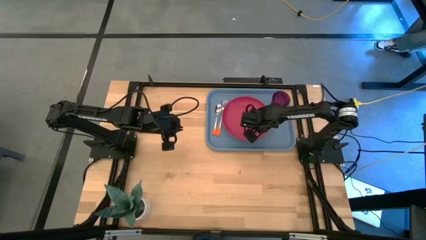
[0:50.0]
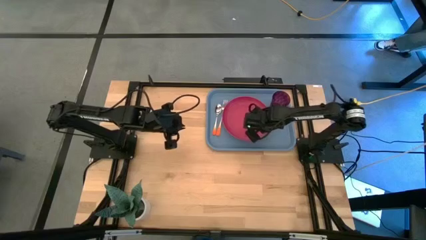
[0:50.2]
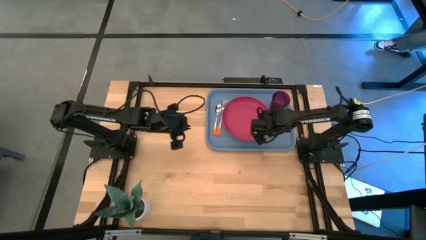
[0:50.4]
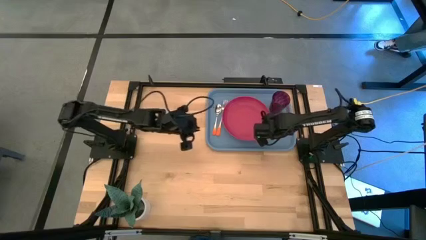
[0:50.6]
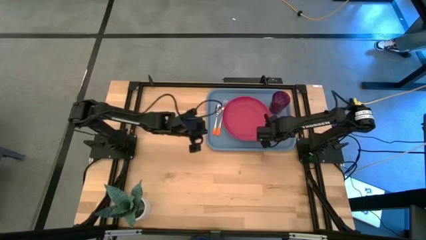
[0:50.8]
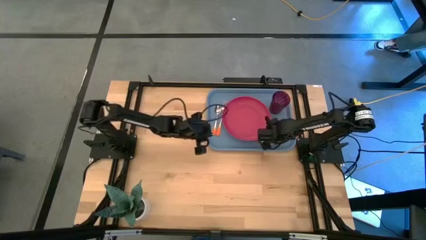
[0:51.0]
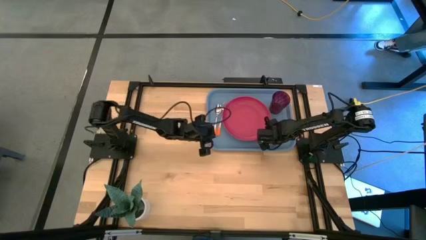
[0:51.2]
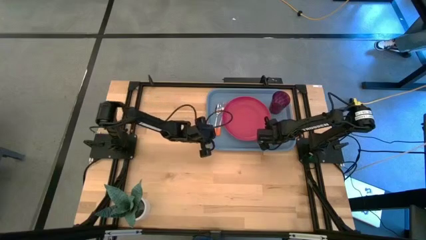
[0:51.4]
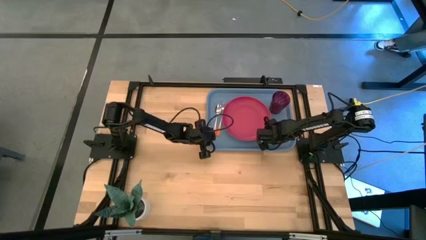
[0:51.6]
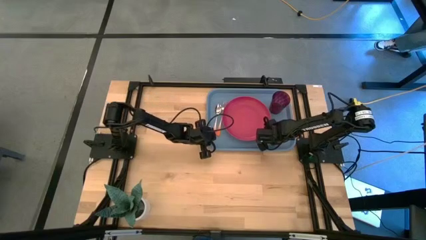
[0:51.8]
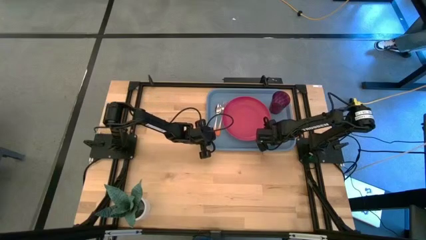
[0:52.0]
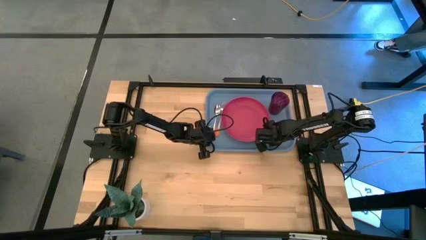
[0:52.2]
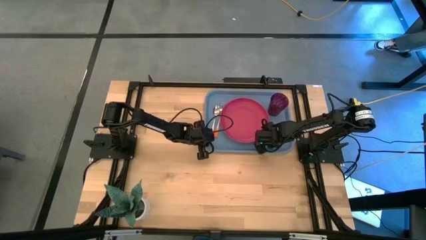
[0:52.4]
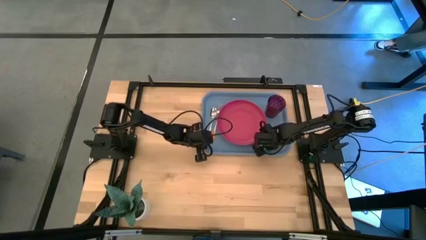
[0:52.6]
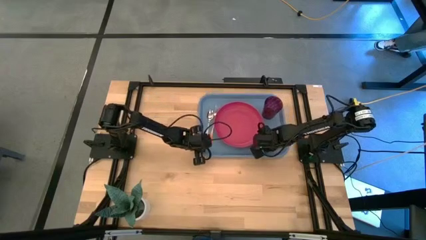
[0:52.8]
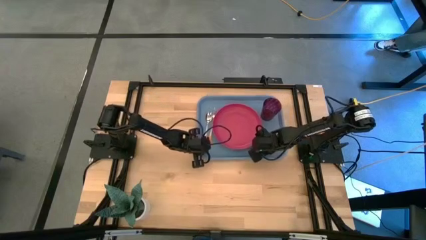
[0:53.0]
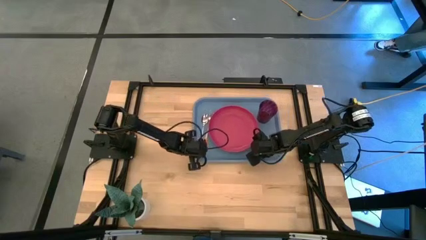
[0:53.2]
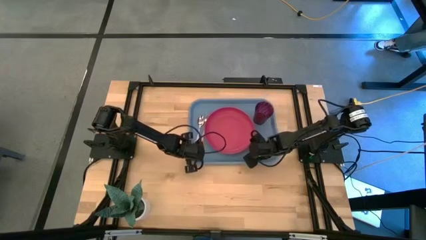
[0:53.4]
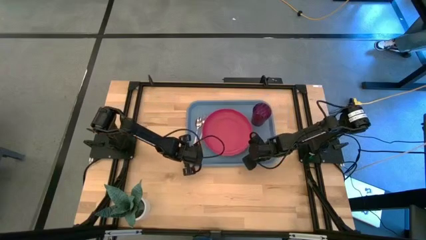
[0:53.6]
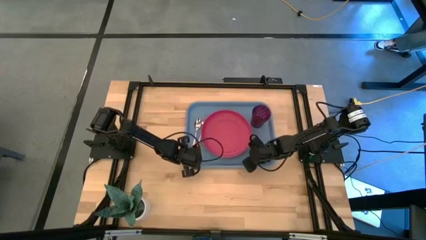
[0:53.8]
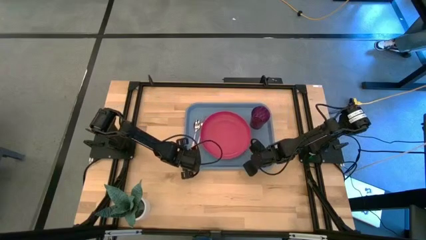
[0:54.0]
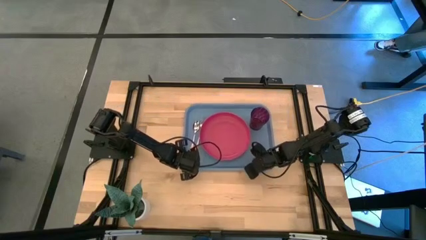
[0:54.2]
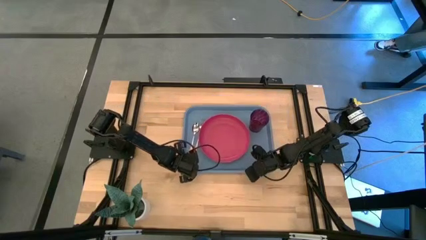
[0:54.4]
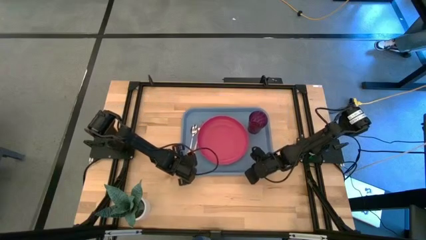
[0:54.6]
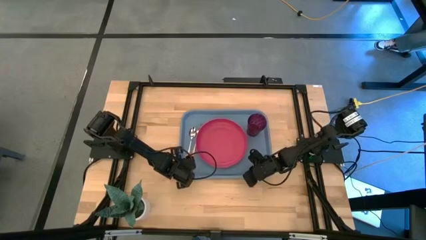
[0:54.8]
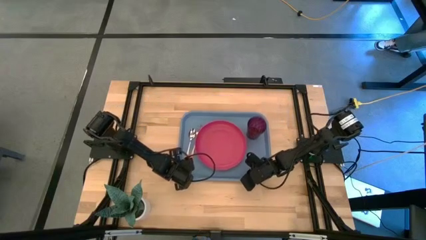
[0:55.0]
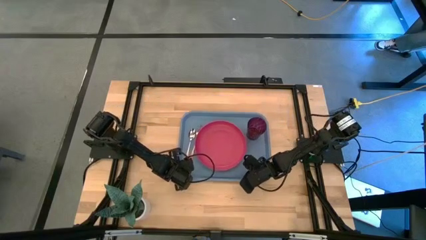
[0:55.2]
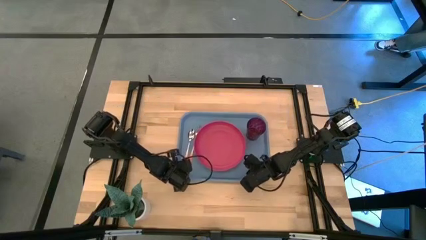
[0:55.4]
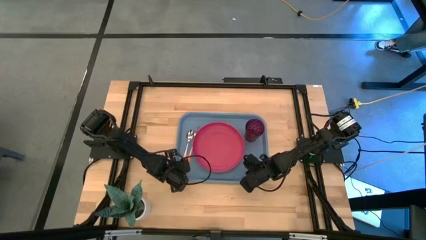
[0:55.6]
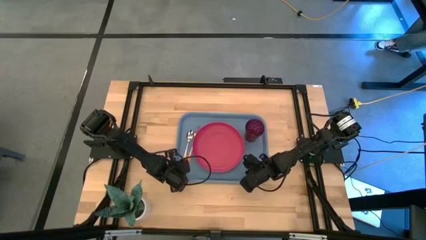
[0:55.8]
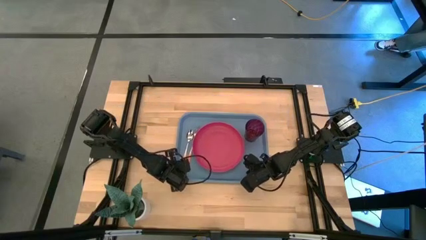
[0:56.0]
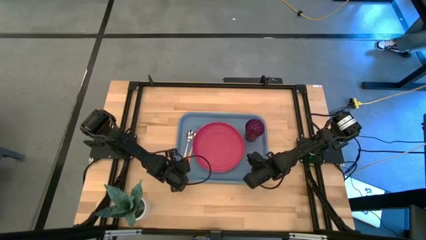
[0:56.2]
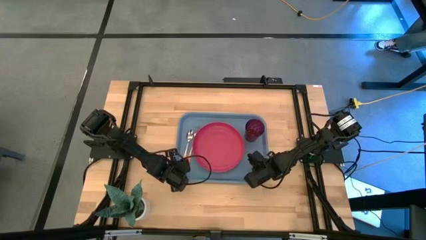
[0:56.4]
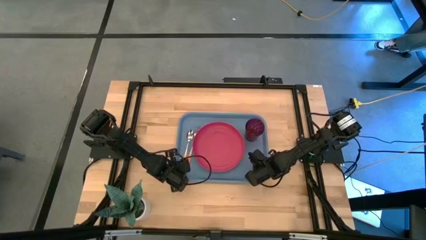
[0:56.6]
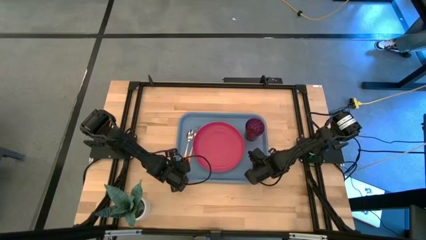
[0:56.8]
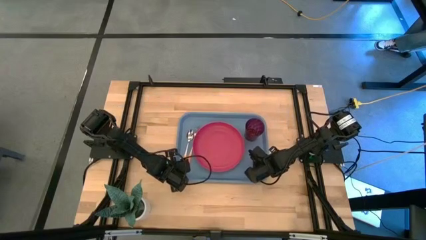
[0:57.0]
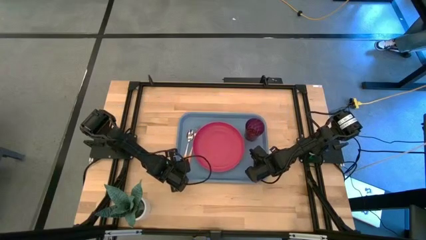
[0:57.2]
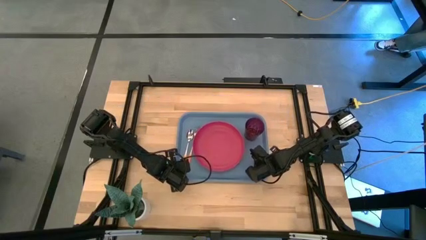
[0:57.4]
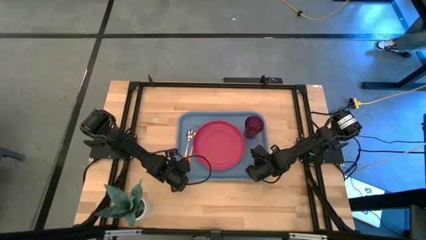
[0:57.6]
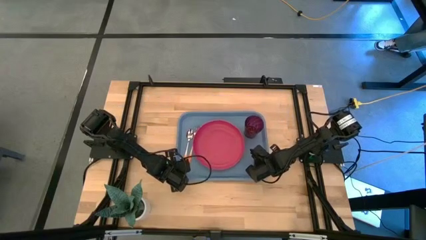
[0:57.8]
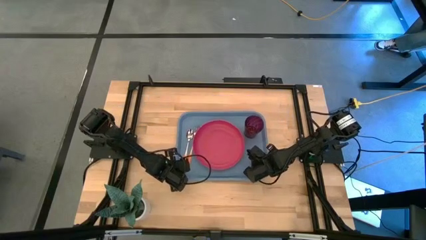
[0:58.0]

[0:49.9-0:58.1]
Task: Pick and place plate/cup/fork/spoon on tray
Move the blue tray from the top right to the center of the table

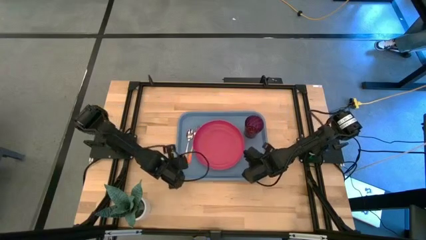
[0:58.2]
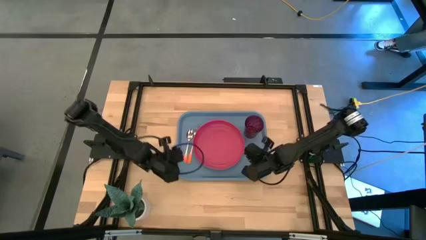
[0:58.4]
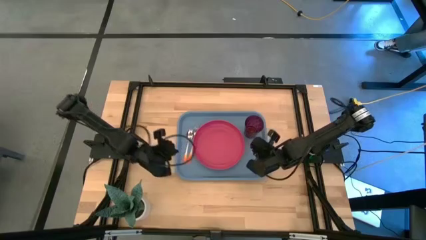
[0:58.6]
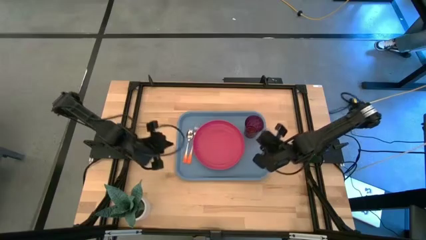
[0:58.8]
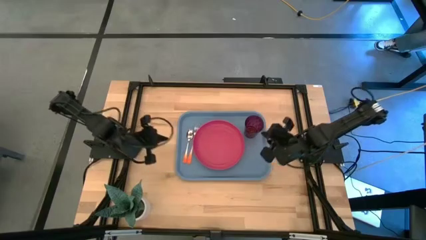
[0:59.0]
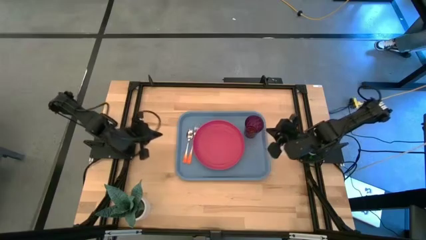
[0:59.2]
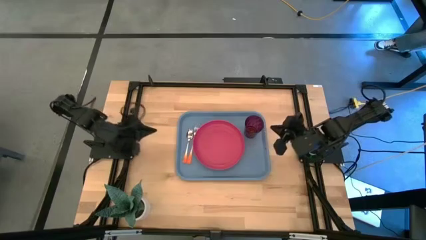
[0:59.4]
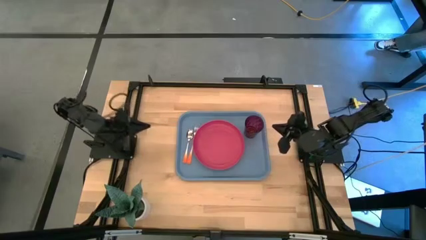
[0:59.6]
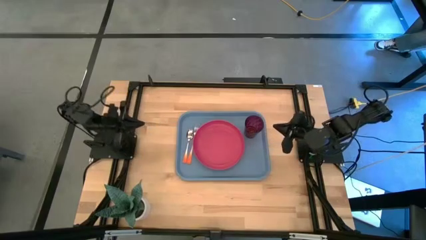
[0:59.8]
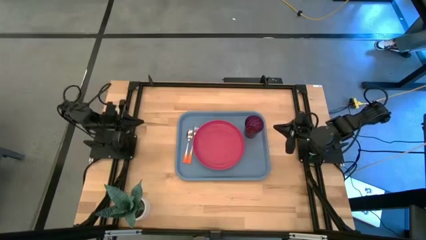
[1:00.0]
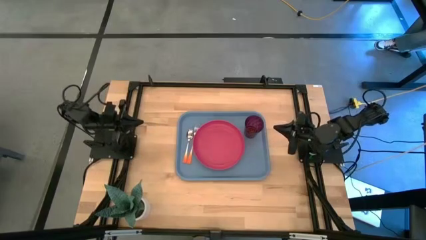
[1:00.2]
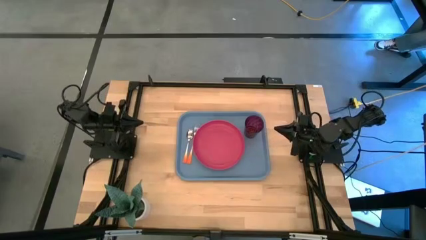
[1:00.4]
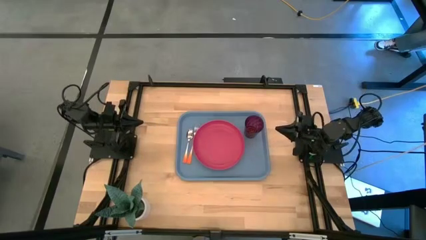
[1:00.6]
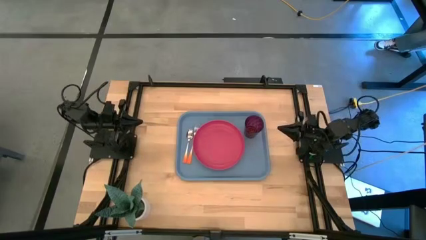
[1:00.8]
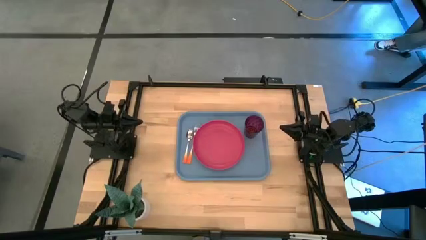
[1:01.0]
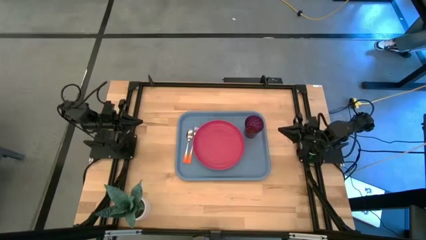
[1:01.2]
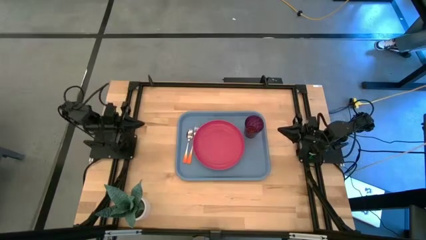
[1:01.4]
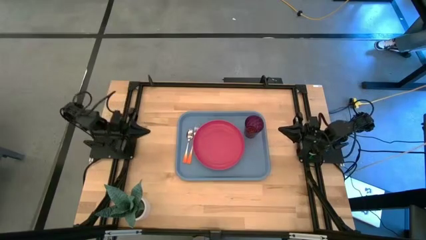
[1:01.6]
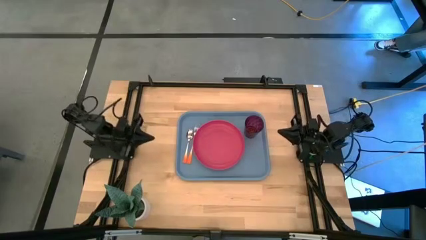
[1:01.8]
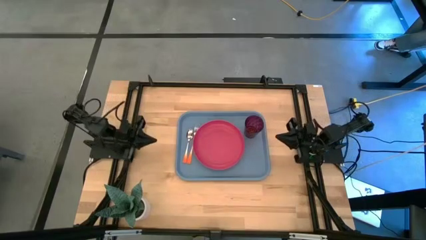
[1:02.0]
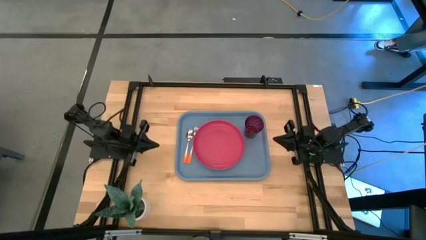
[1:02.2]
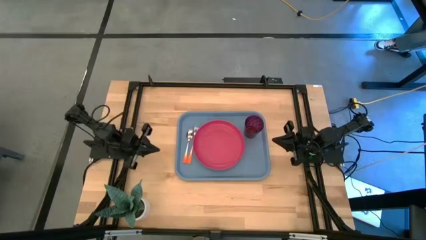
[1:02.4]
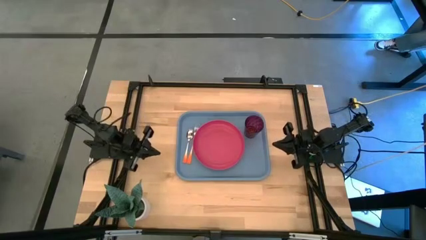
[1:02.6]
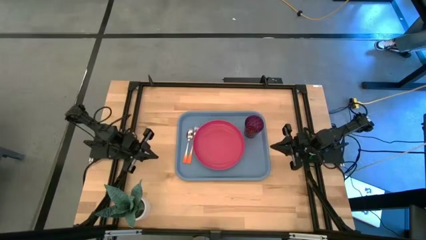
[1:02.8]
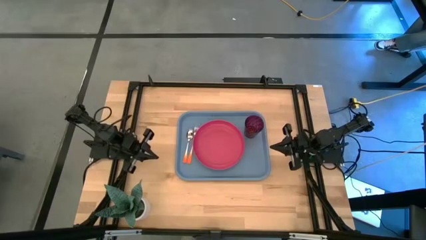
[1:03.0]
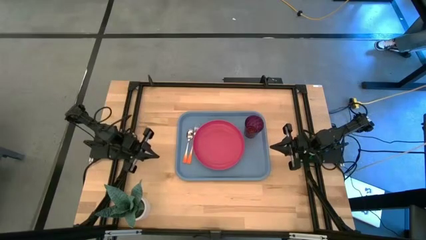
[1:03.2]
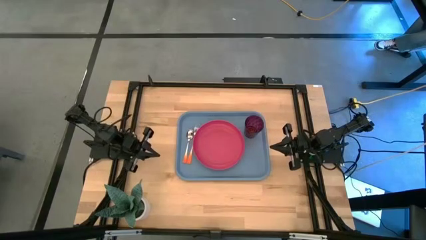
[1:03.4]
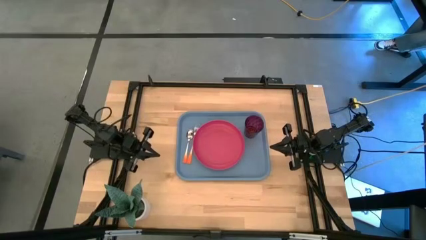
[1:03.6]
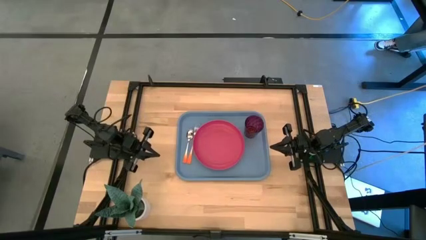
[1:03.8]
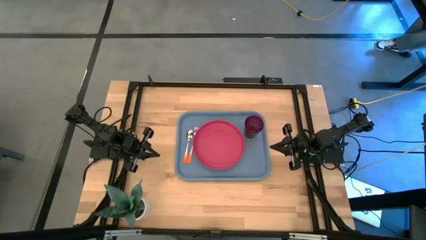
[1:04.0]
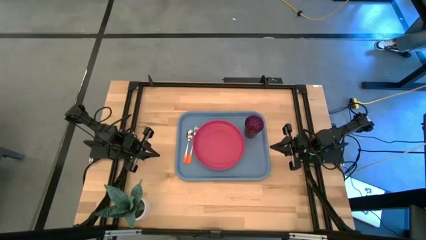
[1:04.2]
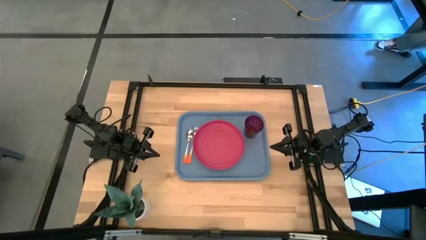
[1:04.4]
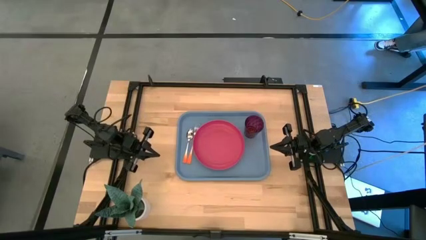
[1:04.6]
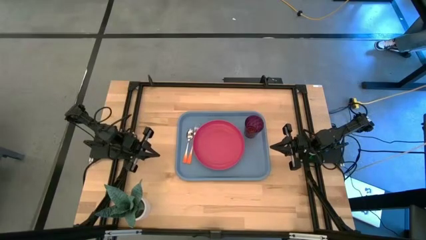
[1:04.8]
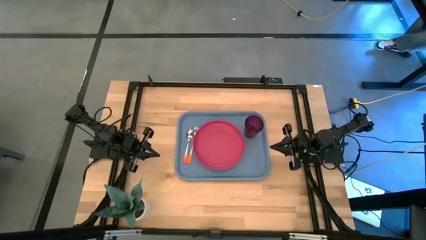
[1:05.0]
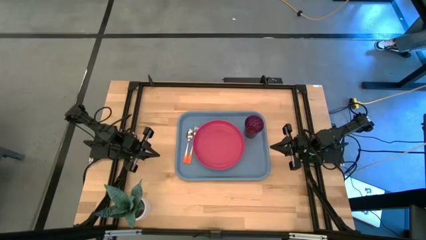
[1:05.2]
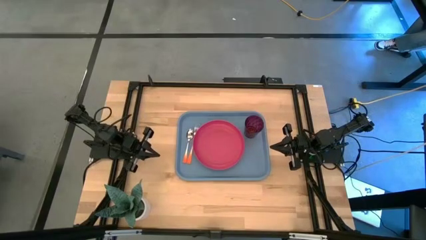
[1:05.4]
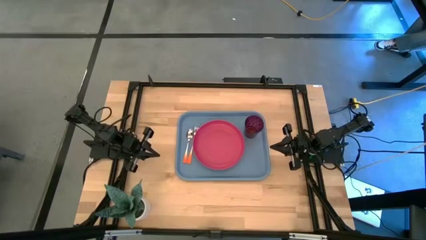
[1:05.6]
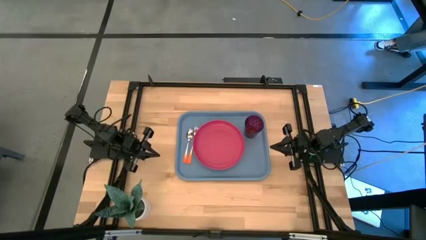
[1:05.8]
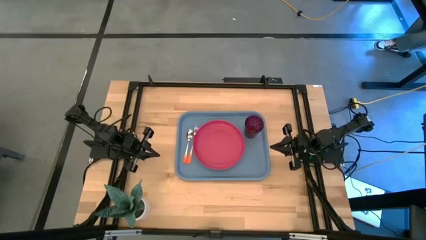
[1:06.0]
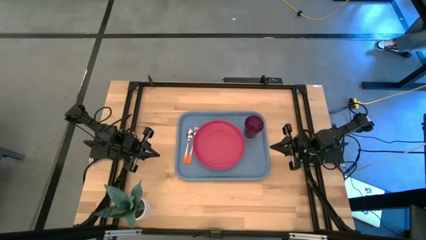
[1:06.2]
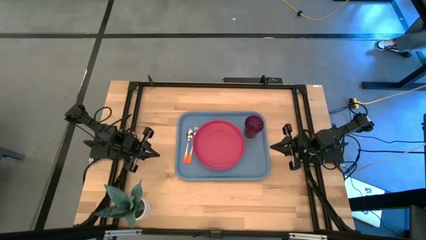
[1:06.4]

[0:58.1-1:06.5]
Return to Home Position

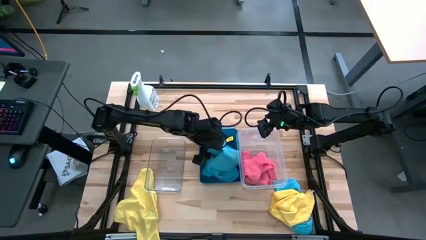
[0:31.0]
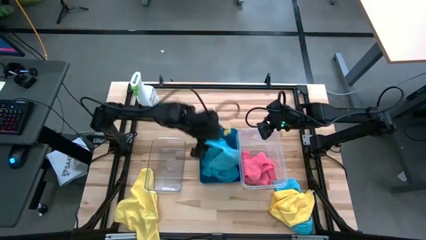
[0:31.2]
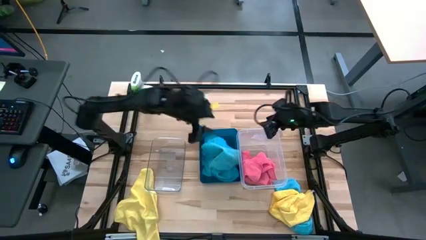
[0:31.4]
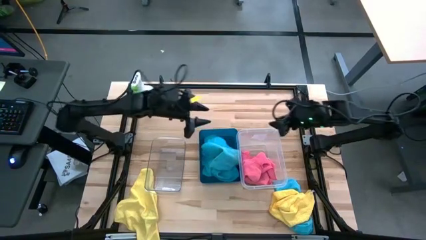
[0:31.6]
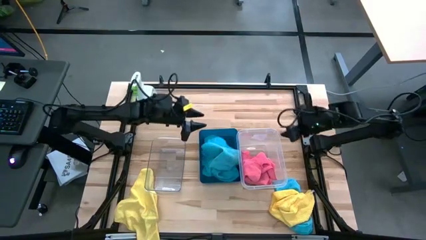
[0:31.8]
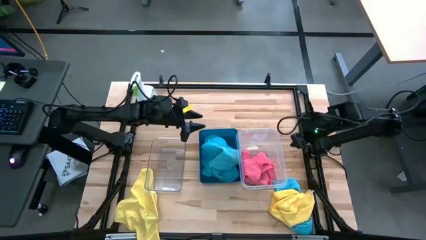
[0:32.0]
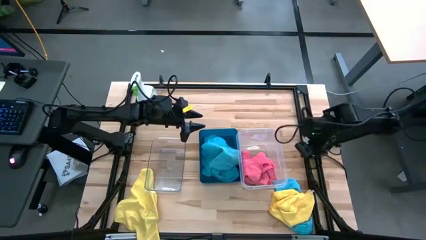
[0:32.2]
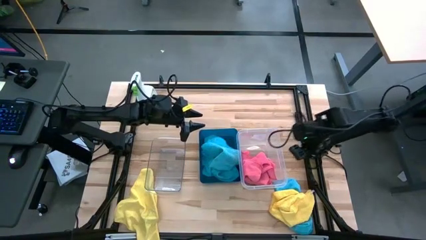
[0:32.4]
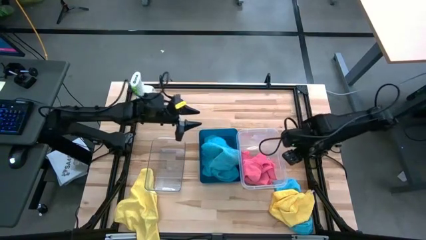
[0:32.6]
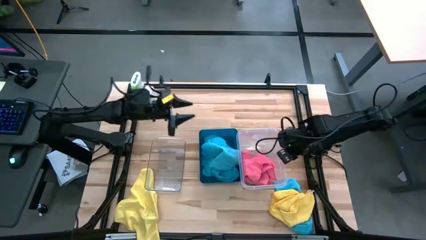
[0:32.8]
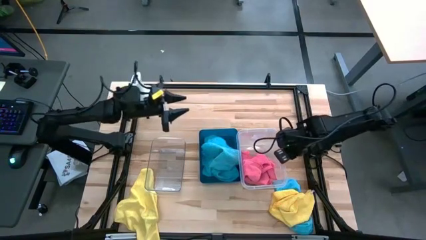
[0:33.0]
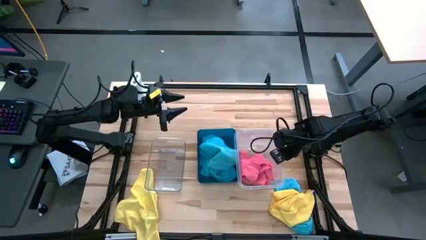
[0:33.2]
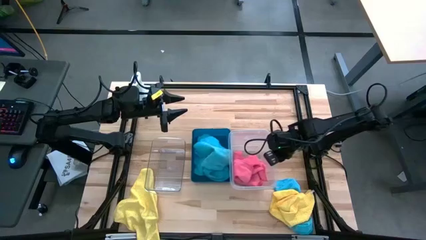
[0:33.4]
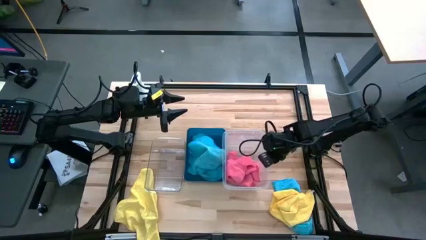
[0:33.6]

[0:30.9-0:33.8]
Task: Sort microfiber towel by color & place in baskets
Adjust the right transparent bin
